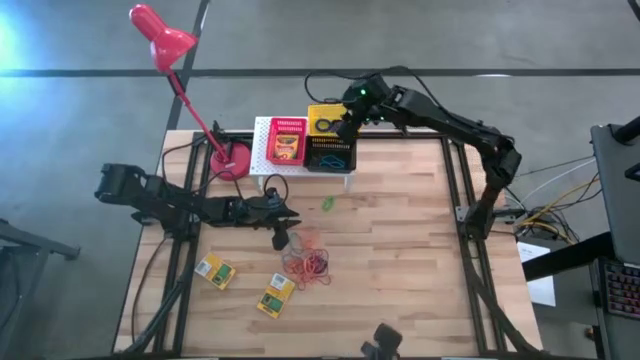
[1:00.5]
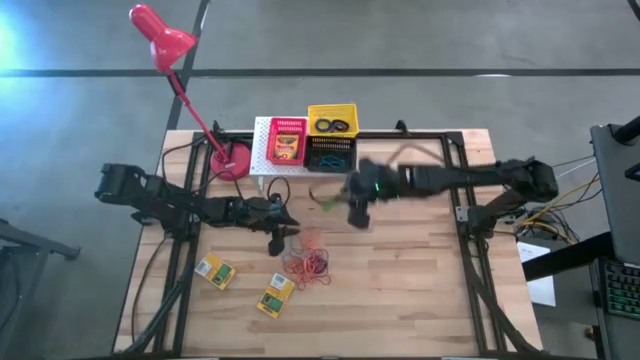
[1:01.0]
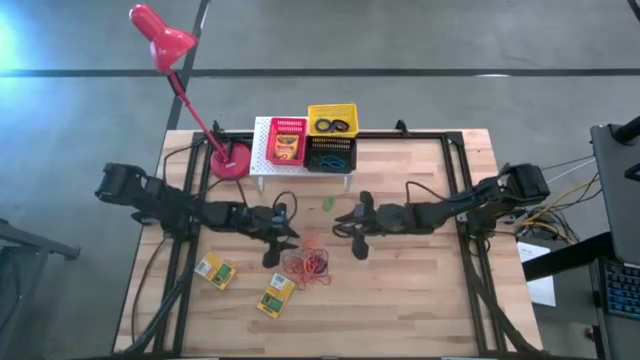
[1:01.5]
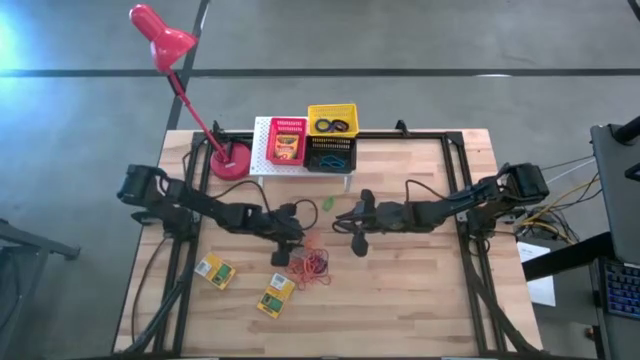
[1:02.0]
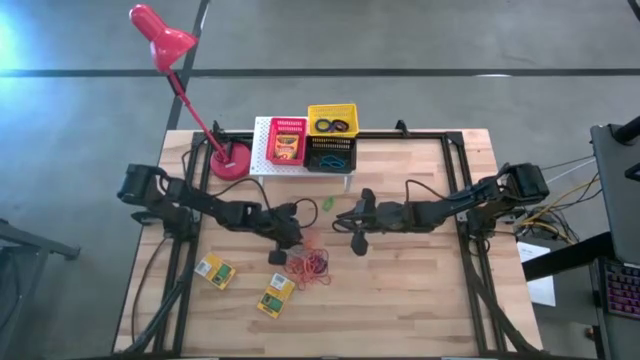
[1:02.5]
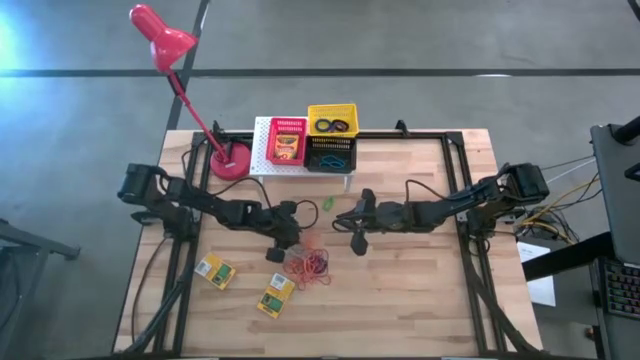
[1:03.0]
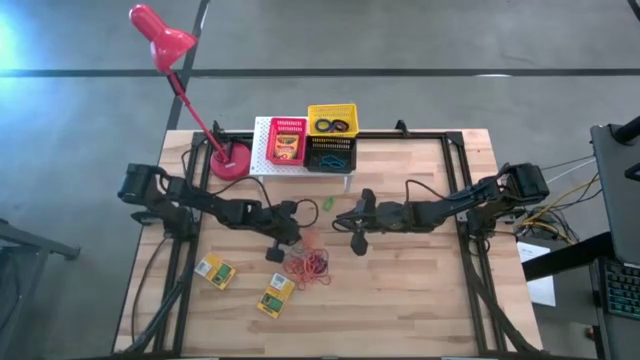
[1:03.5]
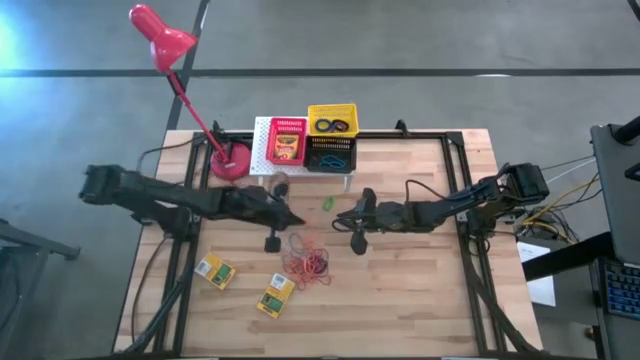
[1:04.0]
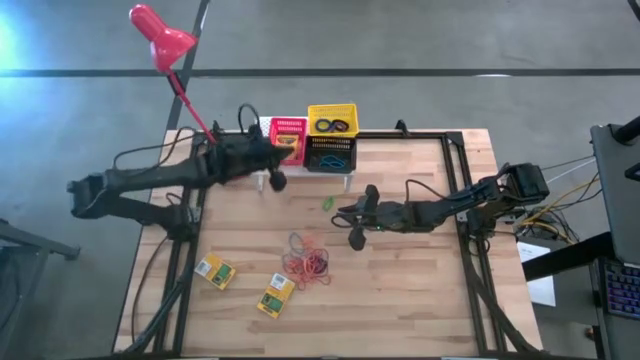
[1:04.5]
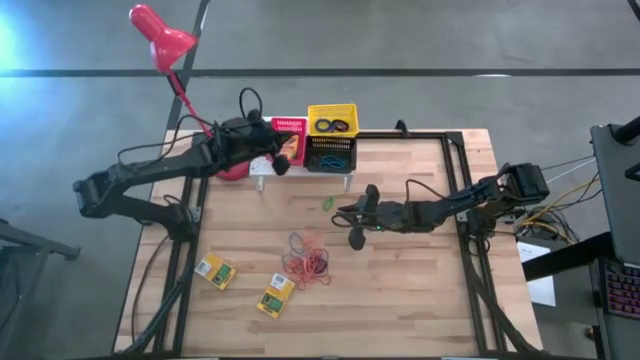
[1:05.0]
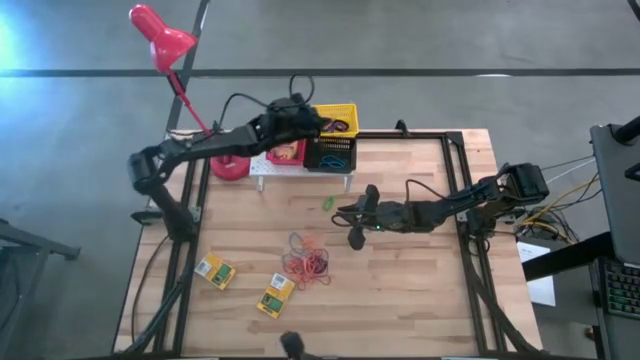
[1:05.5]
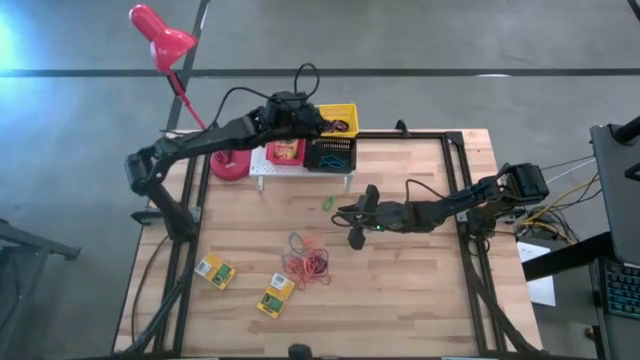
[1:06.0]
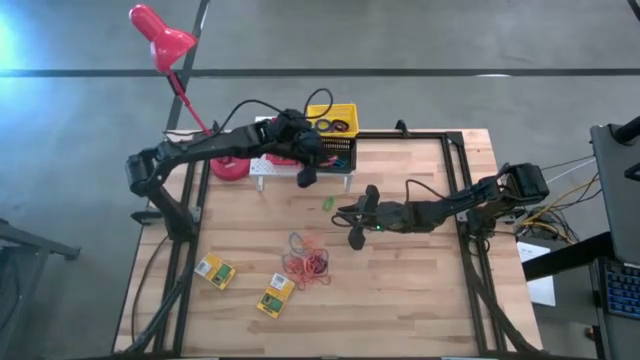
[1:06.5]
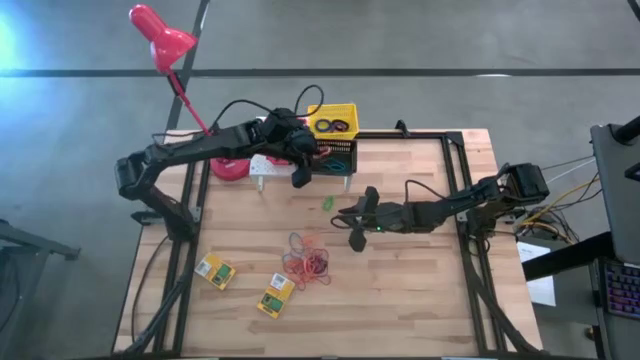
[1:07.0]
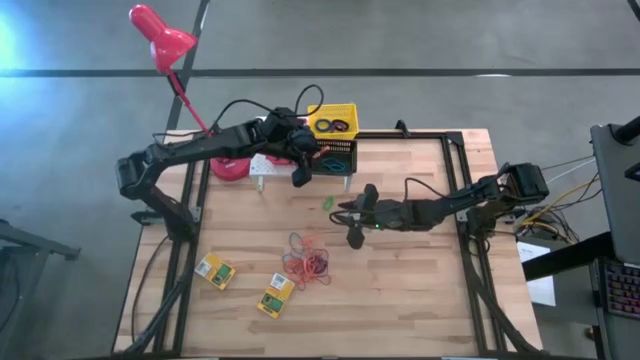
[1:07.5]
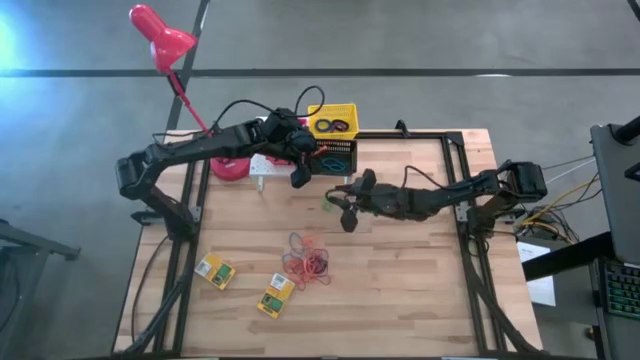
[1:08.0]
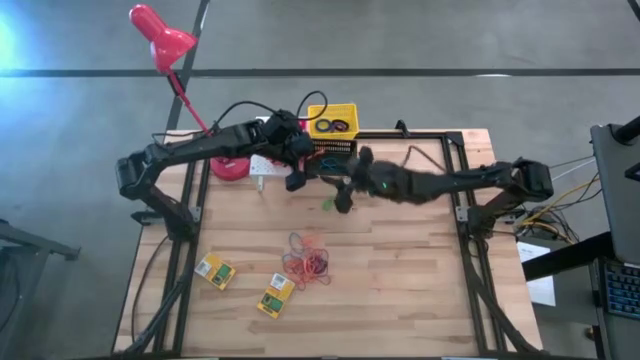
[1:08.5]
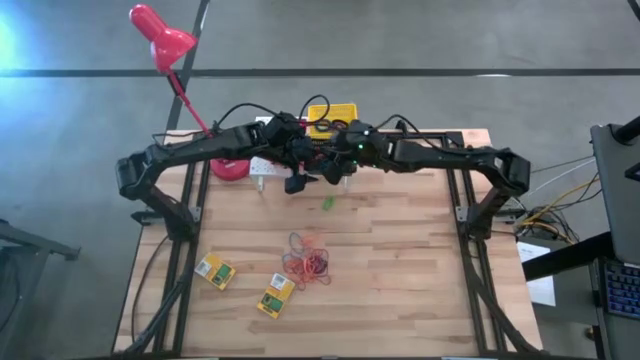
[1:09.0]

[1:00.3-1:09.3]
Task: Pick & Place Office Desk Supplies
Put the orange rubber band into the black bin on the shelf

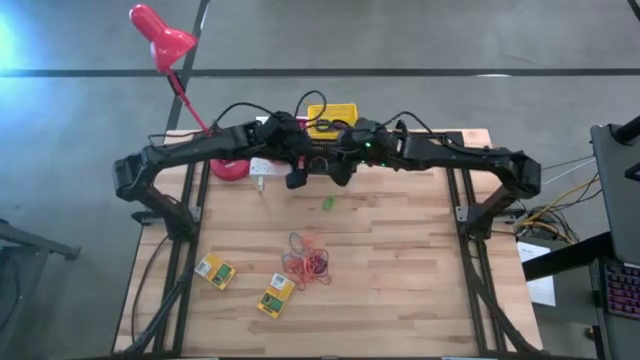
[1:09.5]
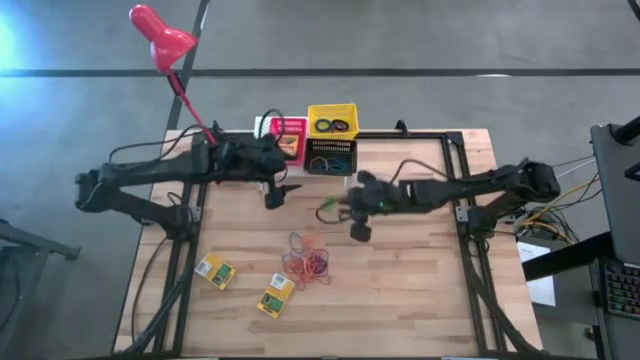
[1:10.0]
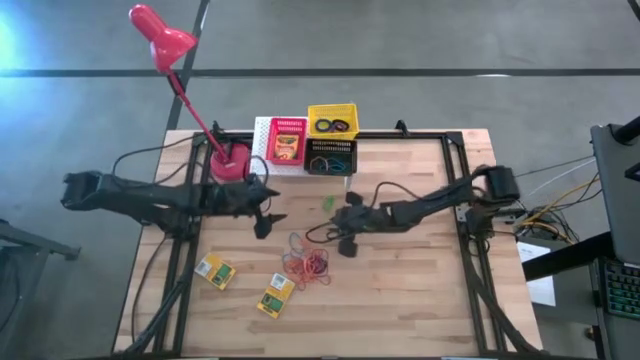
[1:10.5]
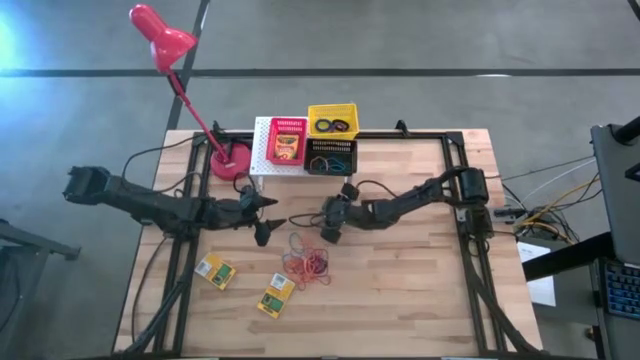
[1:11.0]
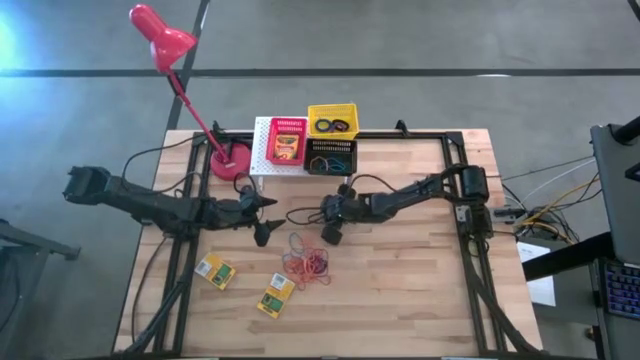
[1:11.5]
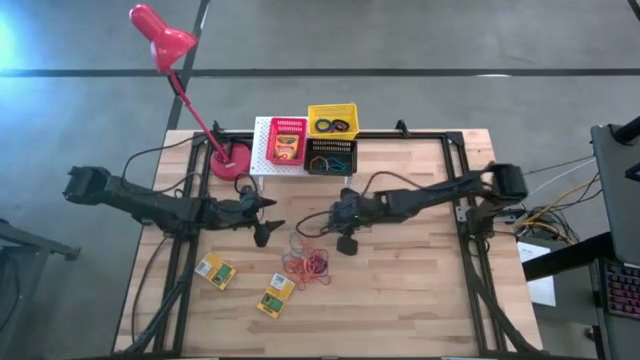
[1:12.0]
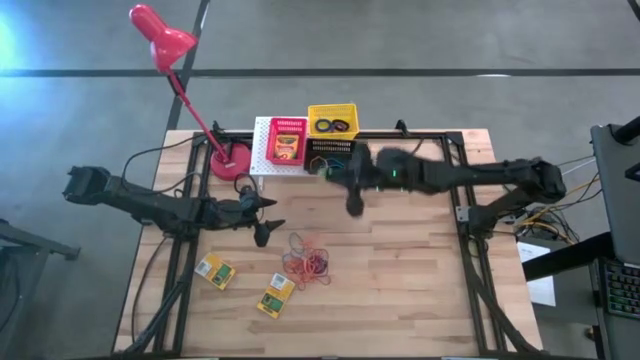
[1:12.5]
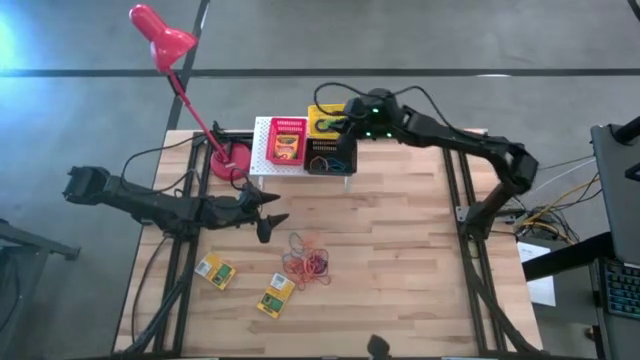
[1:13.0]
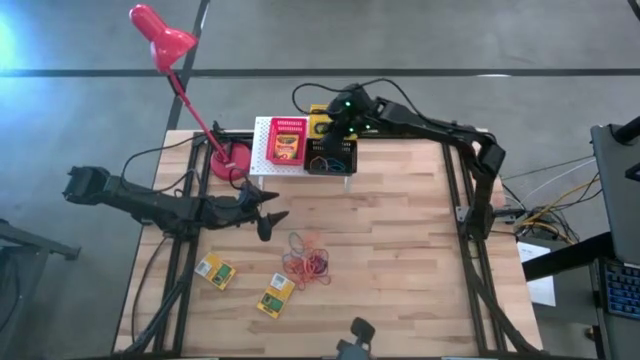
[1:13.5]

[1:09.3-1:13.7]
Put the green spring keychain into the yellow bin on the shelf

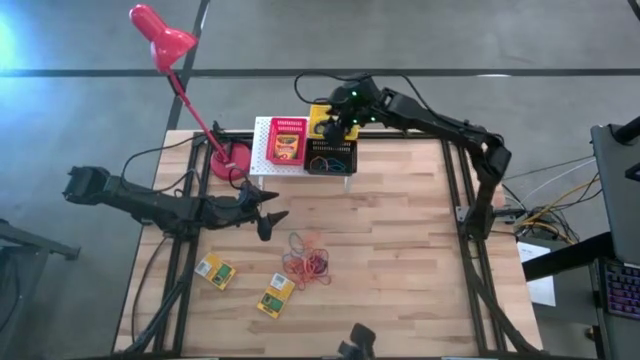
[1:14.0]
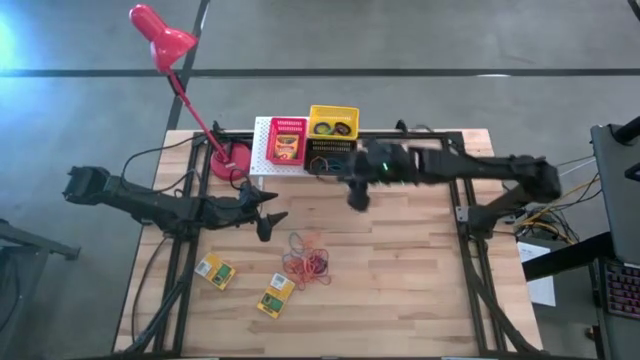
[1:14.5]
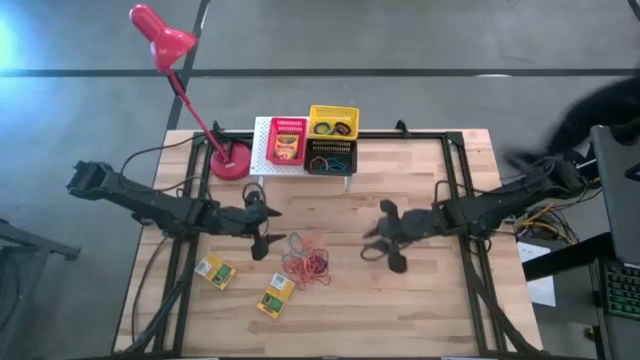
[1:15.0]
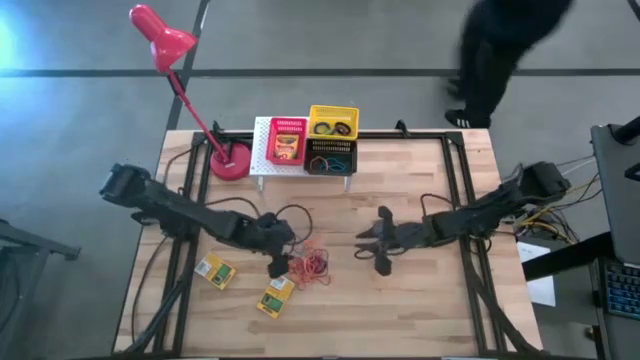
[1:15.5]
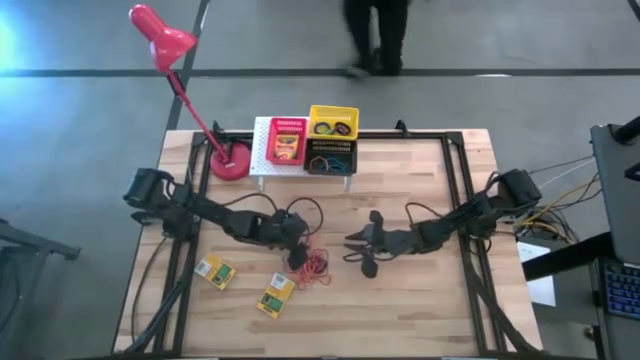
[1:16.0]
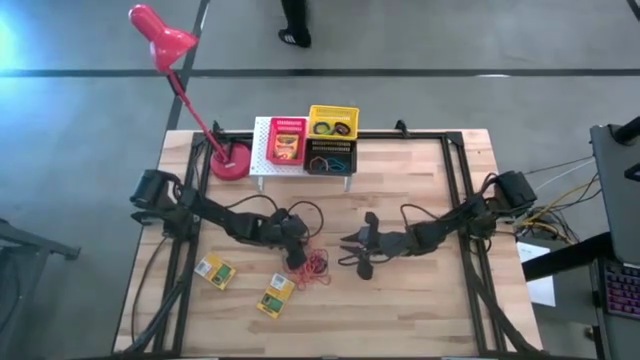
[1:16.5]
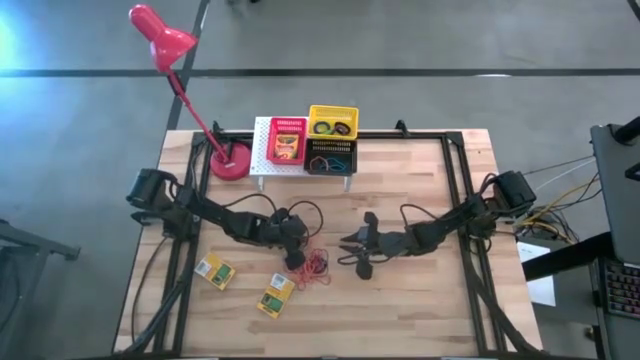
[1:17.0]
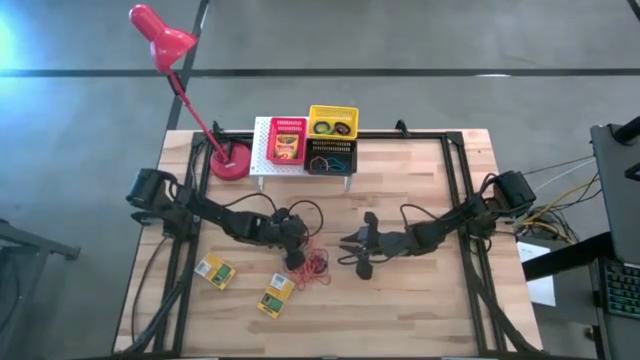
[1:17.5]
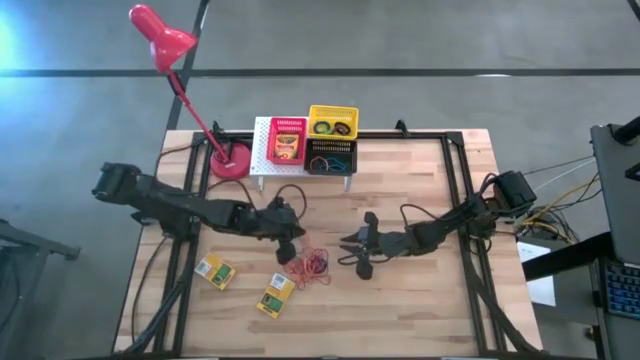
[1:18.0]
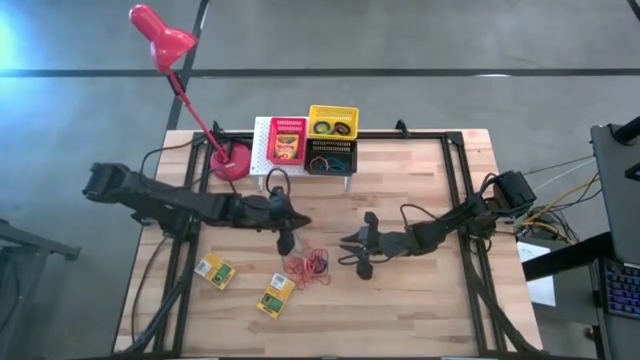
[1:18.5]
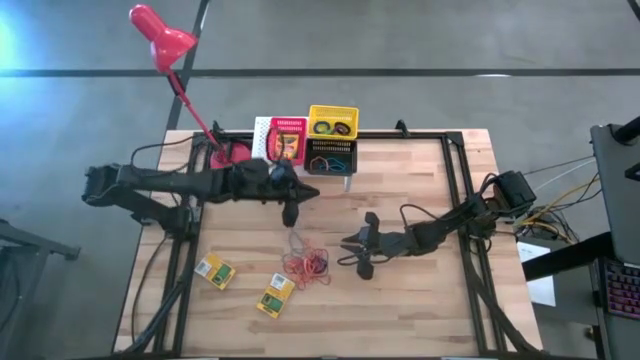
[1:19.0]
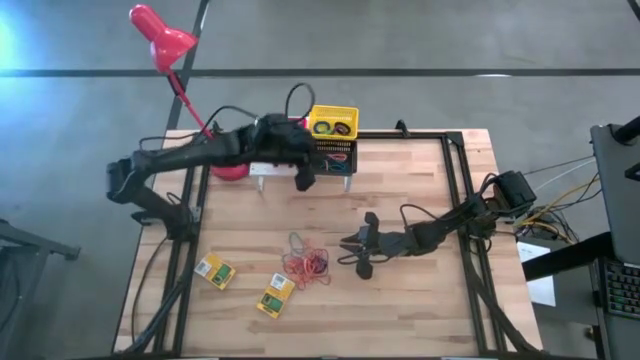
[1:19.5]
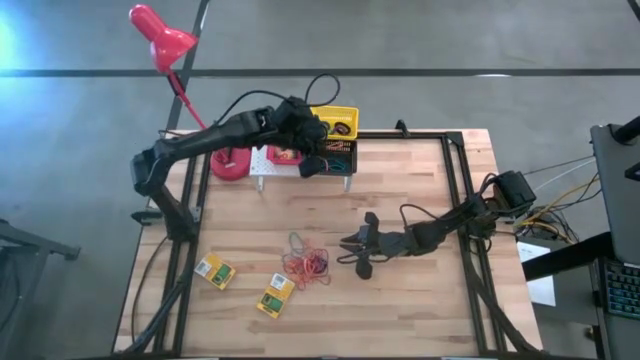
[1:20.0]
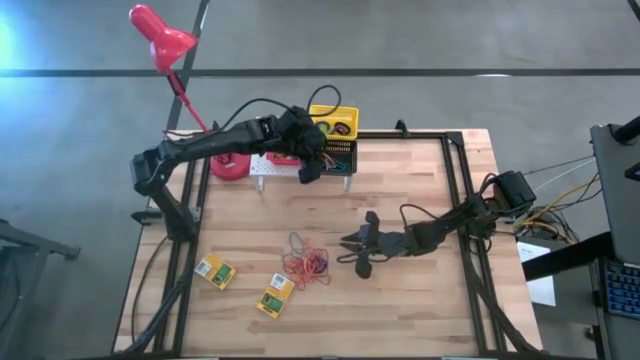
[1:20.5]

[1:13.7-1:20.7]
Put the orange rubber band into the black bin on the shelf

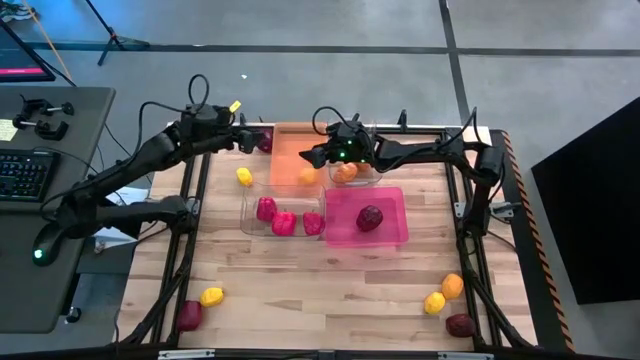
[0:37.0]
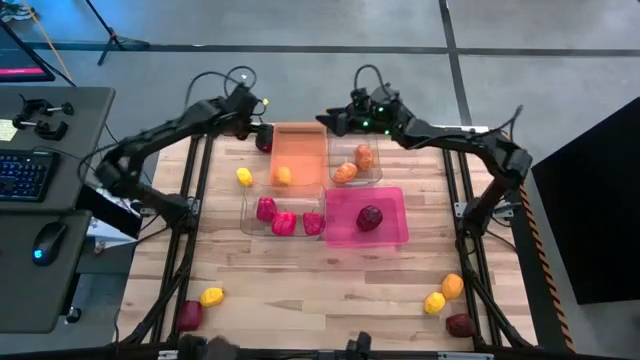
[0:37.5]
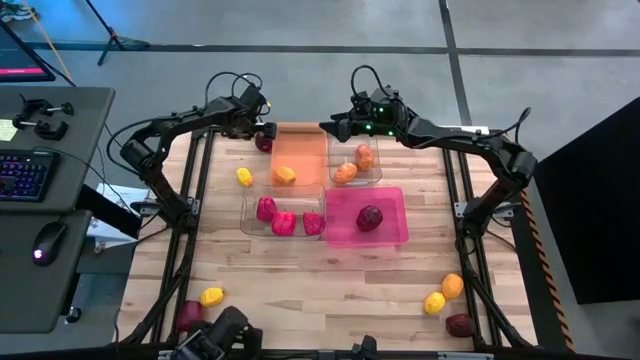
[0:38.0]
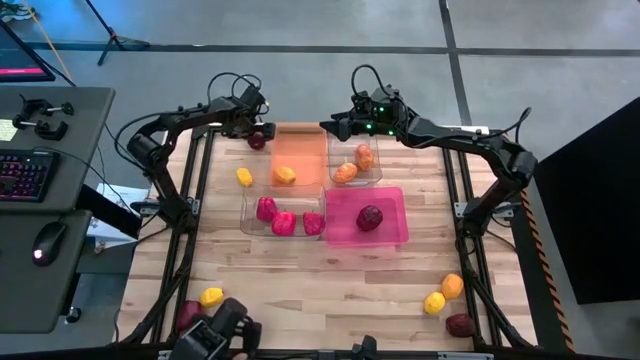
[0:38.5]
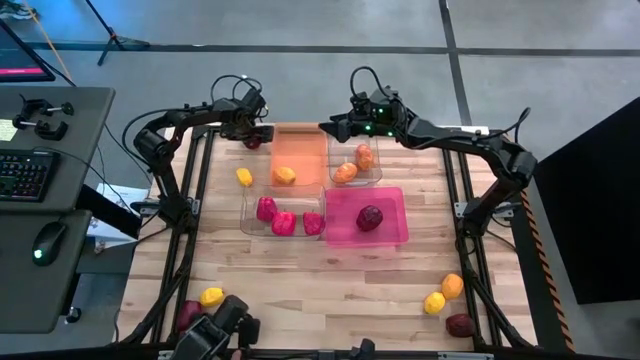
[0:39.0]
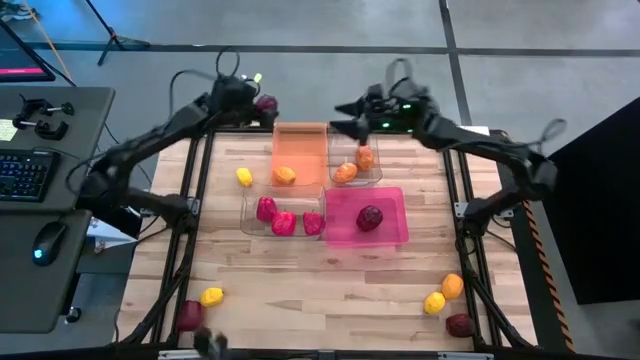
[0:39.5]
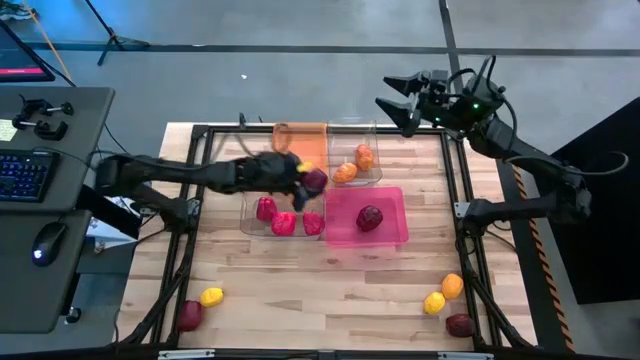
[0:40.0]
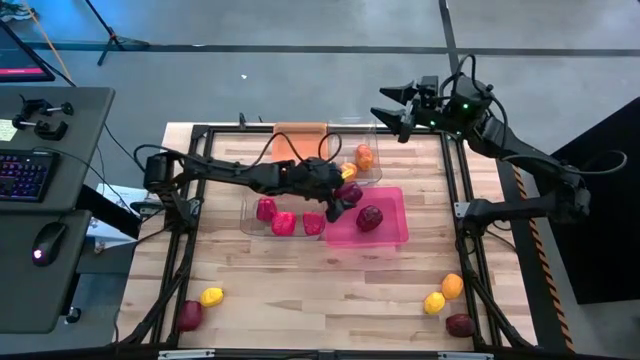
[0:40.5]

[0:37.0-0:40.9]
Task: Sort produce into baskets
Put the red apple into the pink bin
